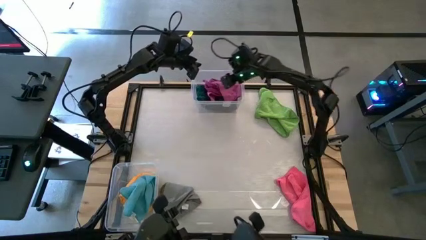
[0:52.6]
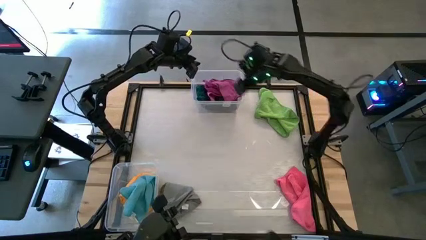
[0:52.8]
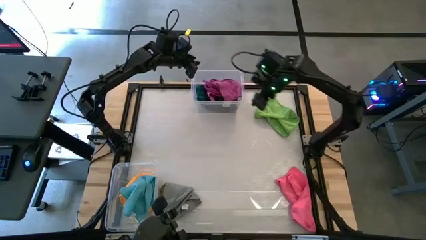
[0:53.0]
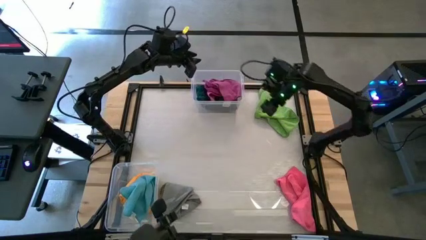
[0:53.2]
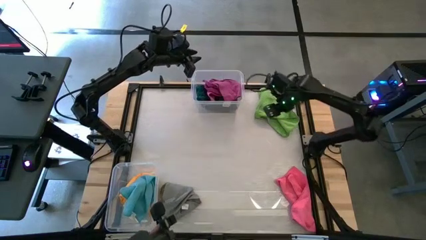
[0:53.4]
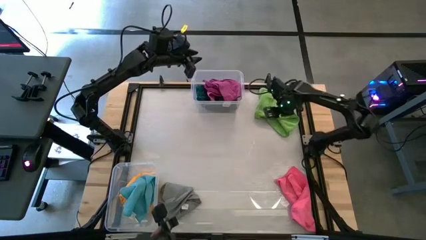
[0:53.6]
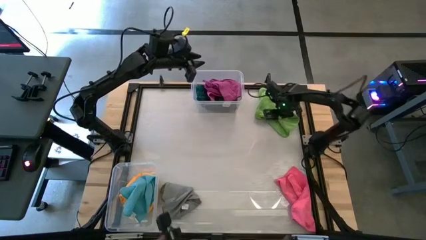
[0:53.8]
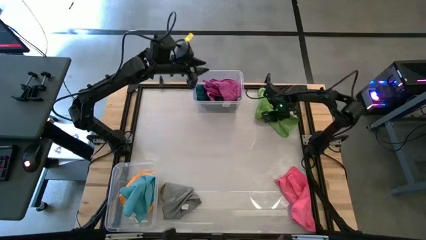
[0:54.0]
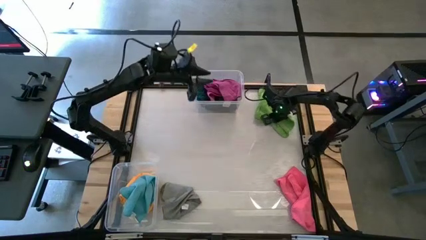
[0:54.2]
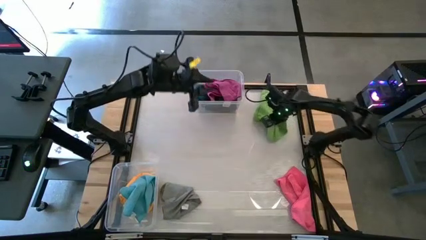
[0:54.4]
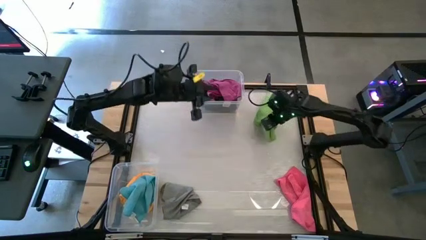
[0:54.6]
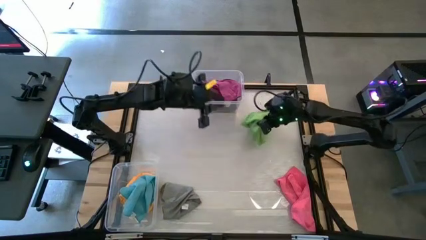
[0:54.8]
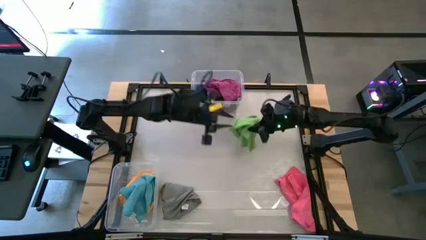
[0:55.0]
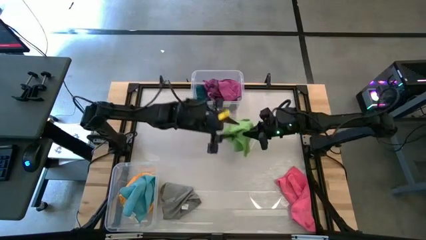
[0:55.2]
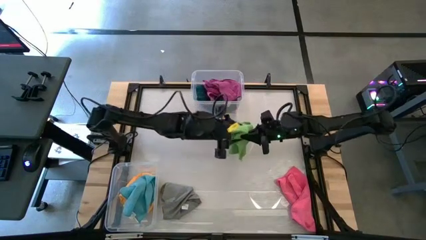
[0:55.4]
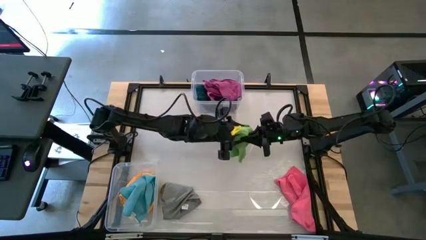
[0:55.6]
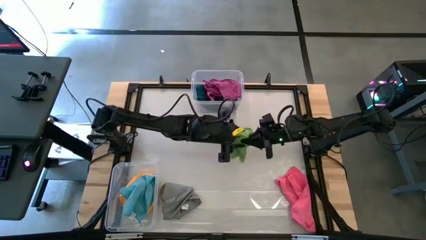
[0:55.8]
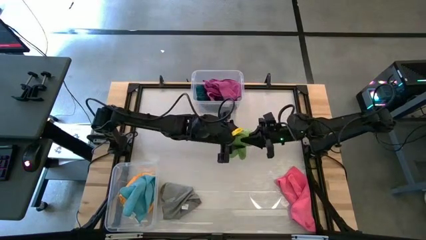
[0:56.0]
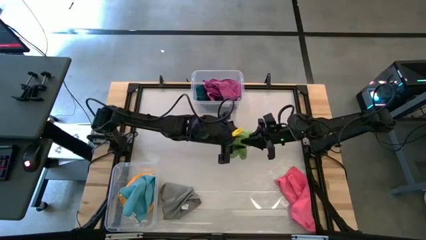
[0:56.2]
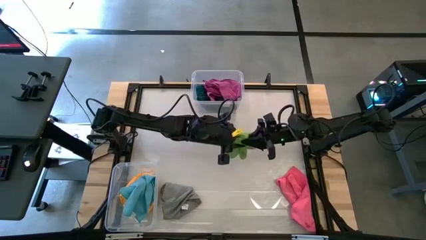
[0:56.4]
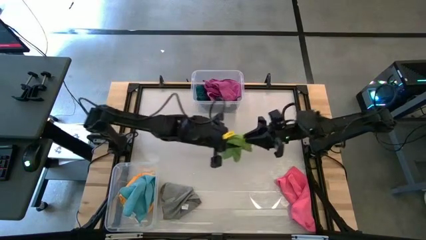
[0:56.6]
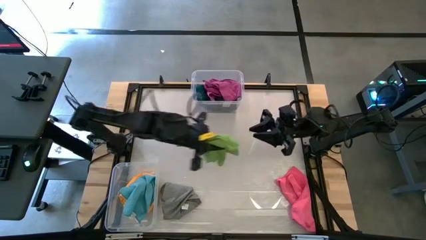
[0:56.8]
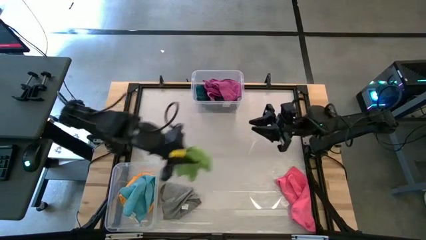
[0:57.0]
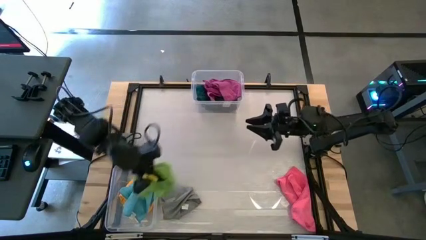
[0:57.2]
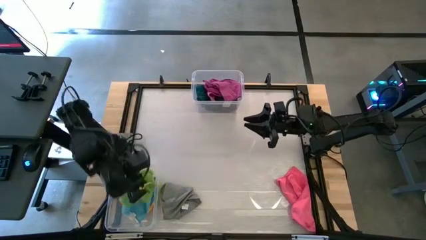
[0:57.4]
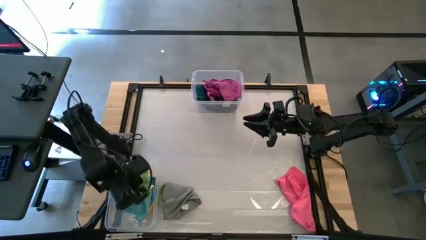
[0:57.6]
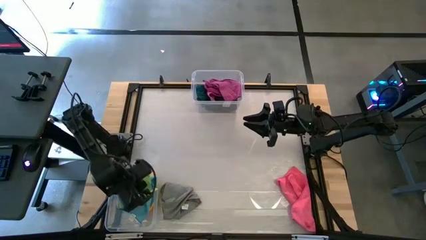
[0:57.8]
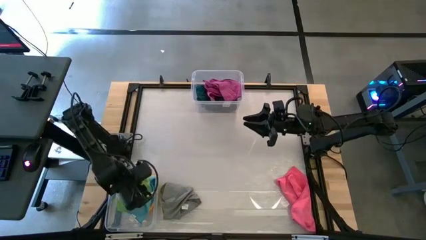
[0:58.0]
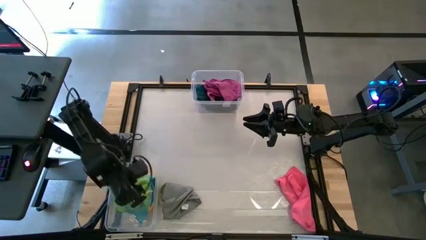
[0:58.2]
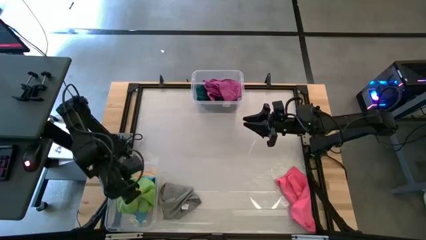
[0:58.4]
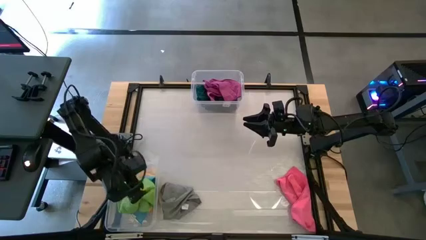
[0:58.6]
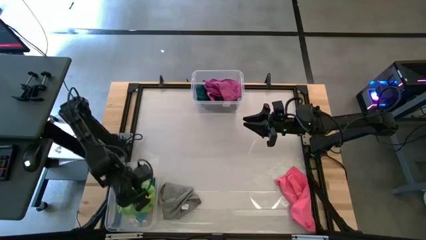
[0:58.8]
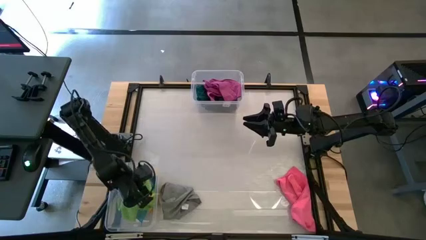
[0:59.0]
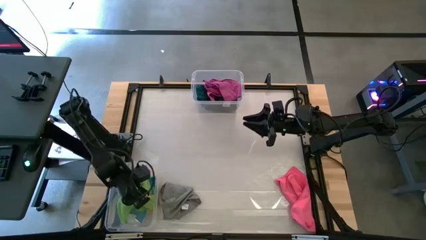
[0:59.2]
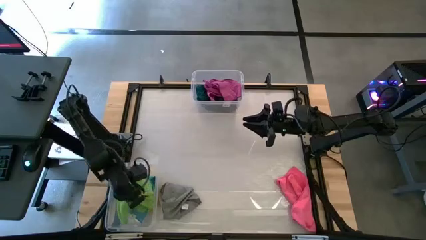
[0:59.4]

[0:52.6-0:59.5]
Task: Sort towels by color in basket
Put the green microfiber towel into the bottom transparent bin

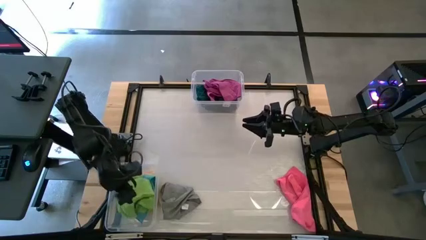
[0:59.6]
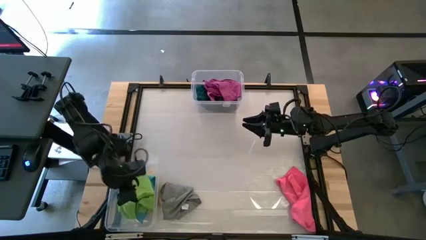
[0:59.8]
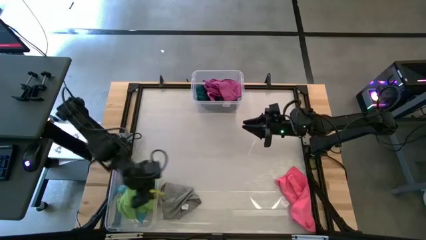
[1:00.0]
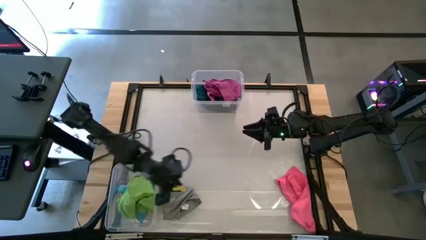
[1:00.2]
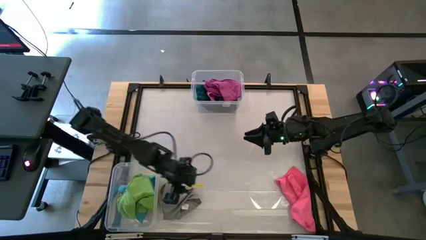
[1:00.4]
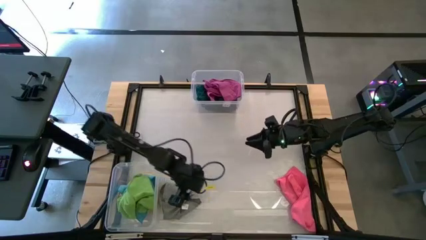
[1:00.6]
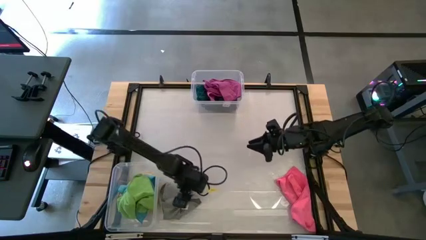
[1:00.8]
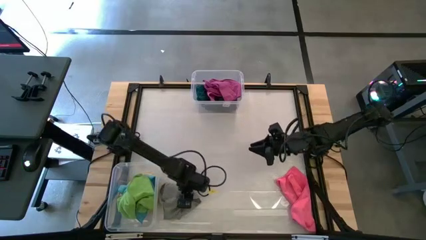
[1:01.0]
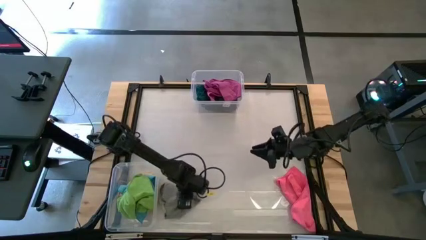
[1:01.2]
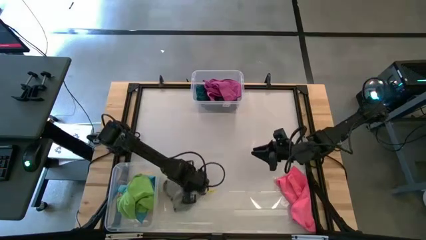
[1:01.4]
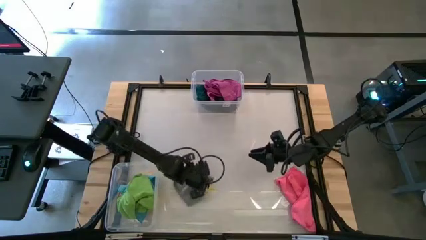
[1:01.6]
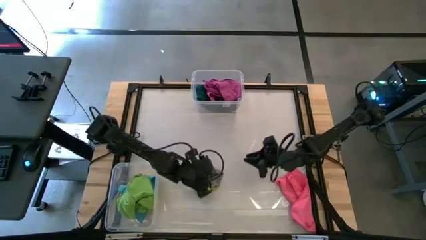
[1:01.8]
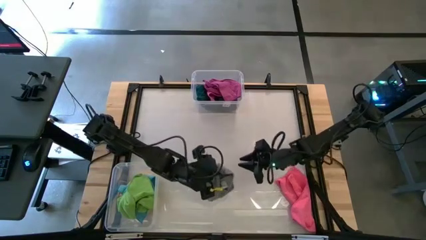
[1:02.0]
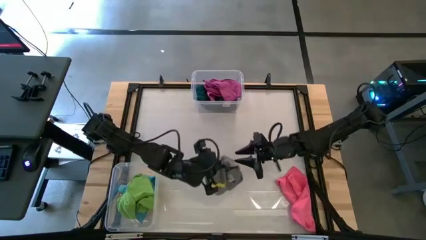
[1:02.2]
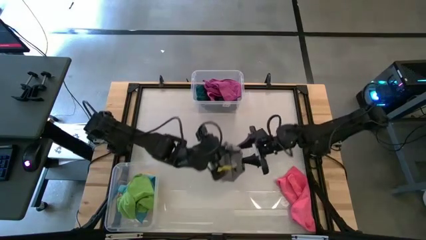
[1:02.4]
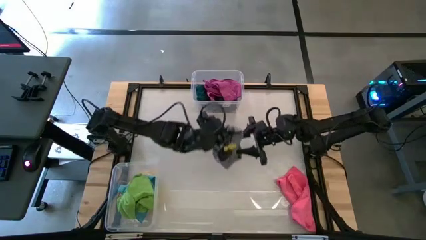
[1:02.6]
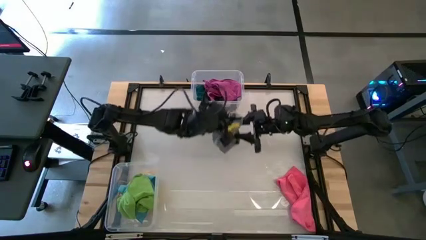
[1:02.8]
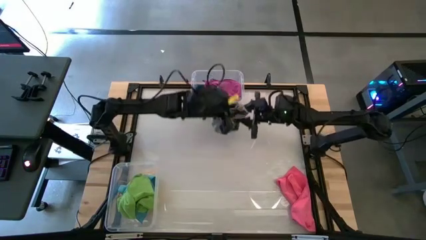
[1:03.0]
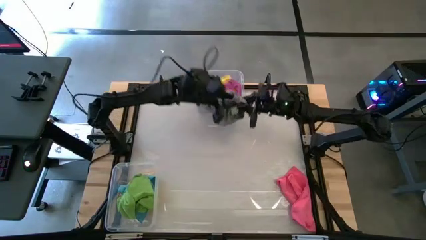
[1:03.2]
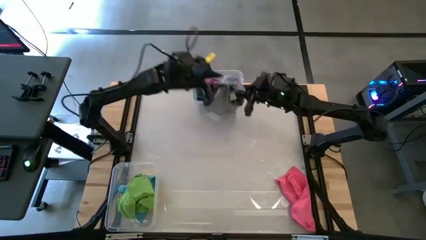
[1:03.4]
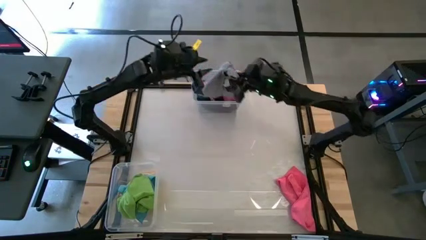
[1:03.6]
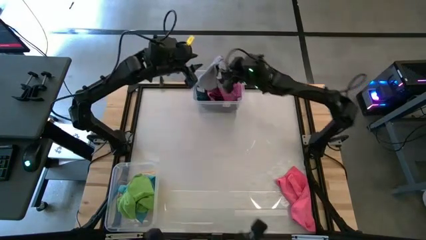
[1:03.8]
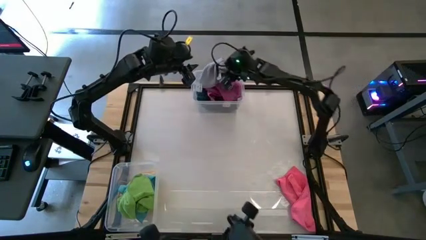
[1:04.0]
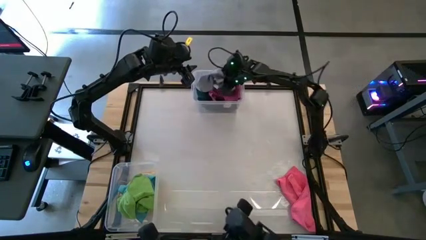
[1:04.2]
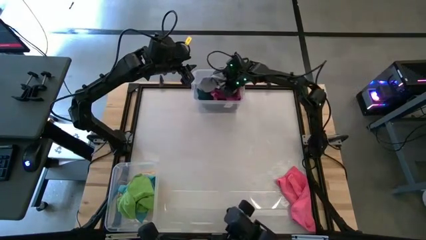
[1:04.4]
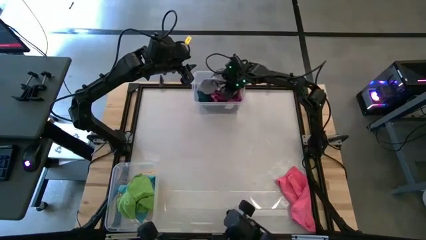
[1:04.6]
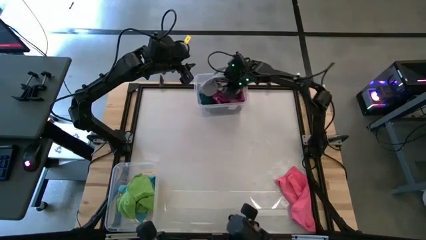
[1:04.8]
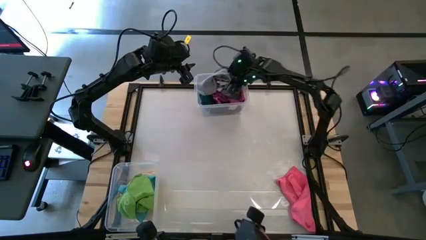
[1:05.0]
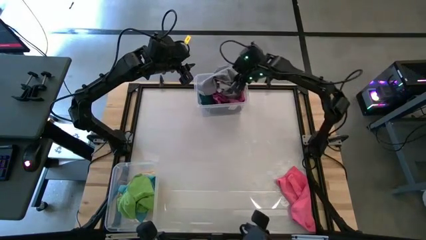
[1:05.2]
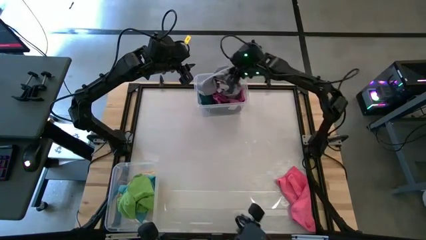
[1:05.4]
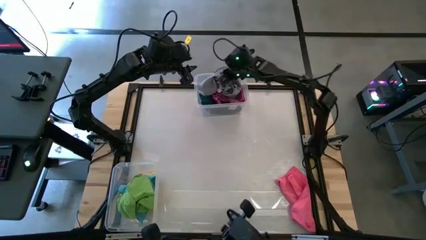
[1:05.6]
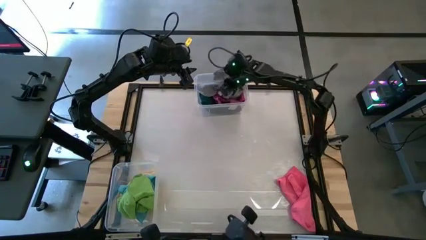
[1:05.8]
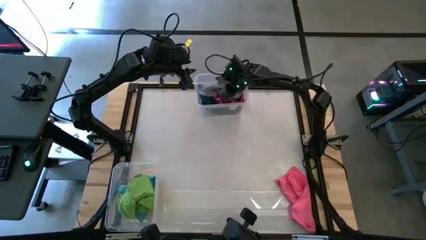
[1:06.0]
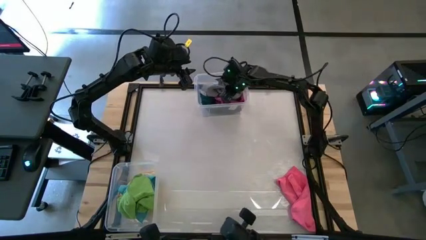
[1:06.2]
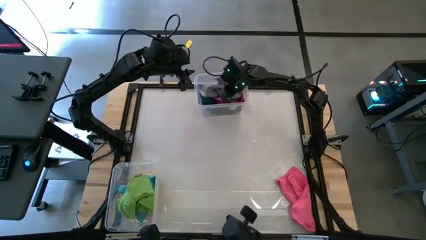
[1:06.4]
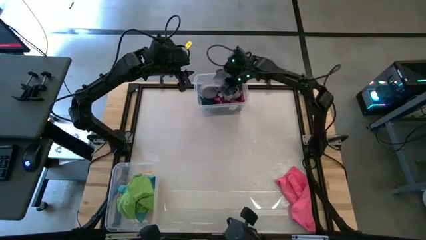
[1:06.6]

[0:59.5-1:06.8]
Put the gray kitchen towel into the top transparent bin

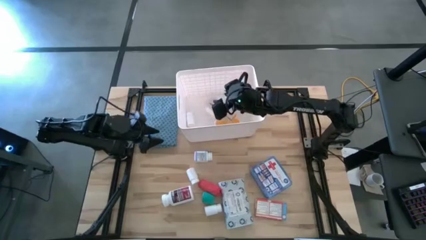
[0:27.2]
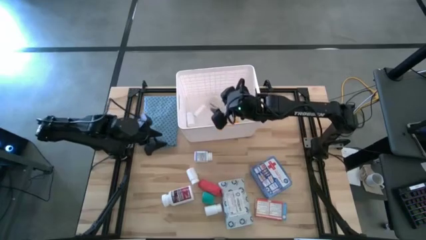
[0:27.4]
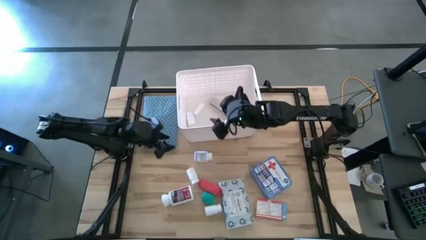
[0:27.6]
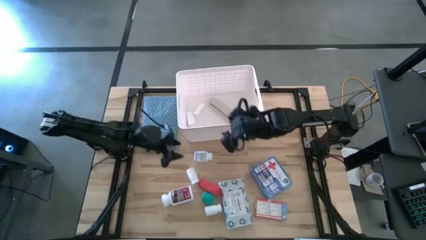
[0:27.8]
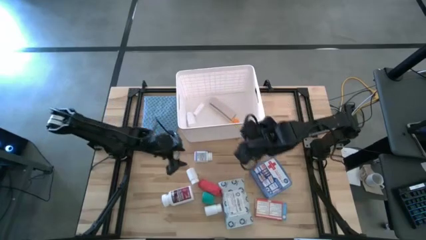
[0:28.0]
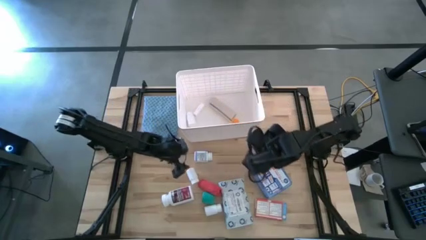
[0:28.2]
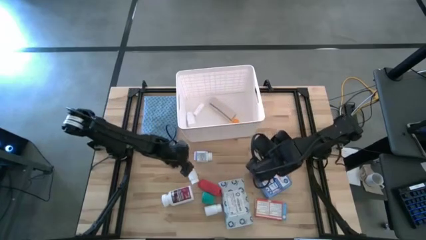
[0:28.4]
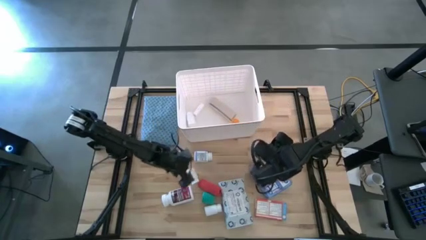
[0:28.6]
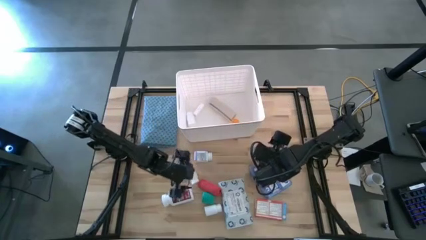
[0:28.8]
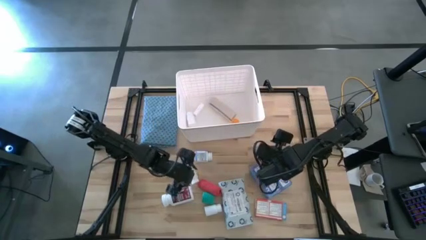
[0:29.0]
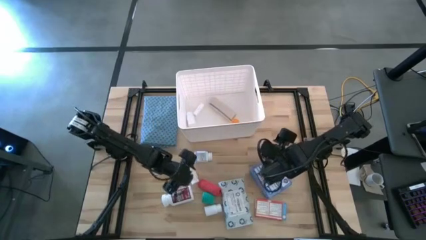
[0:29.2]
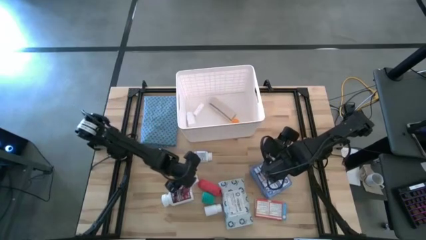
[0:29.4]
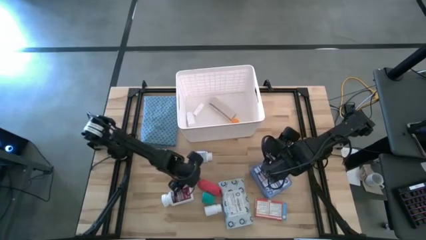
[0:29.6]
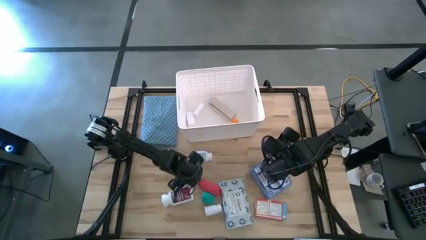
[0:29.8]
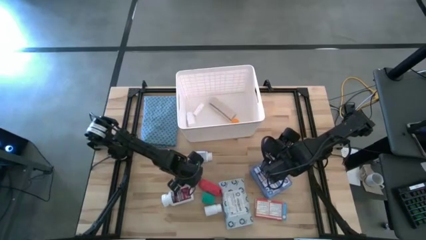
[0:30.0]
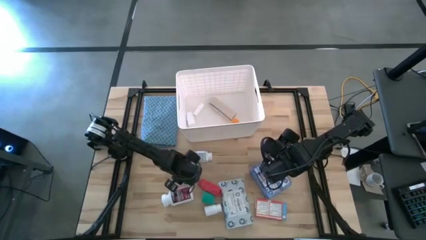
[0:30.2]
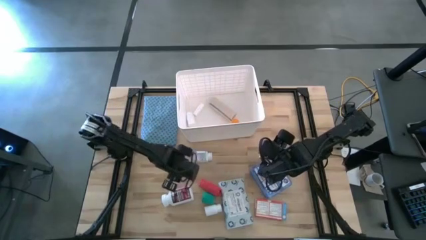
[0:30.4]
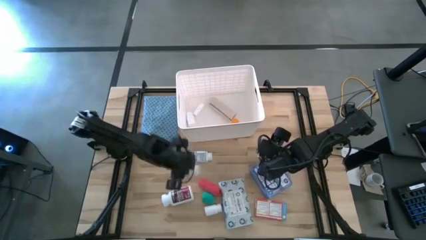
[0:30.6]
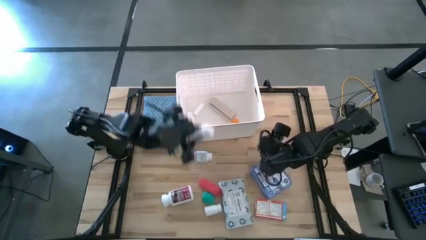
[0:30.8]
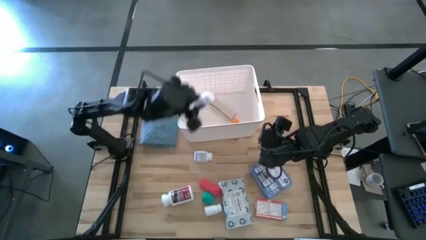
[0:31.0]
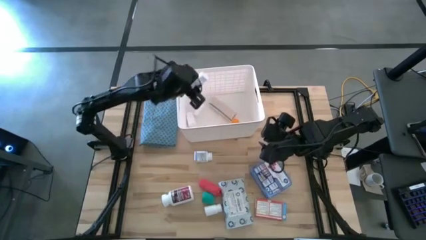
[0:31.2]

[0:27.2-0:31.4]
Task: Pick & place medical supplies in basket/bin
Put the top white pill bottle into the white container
